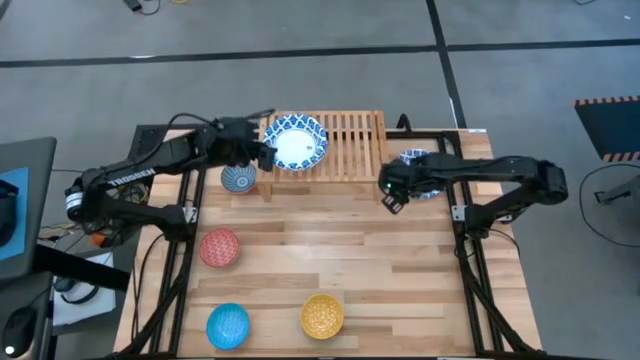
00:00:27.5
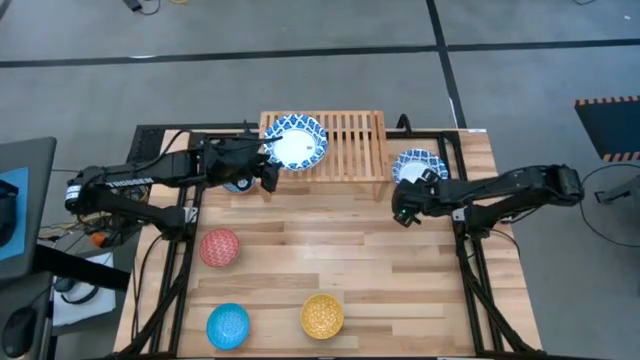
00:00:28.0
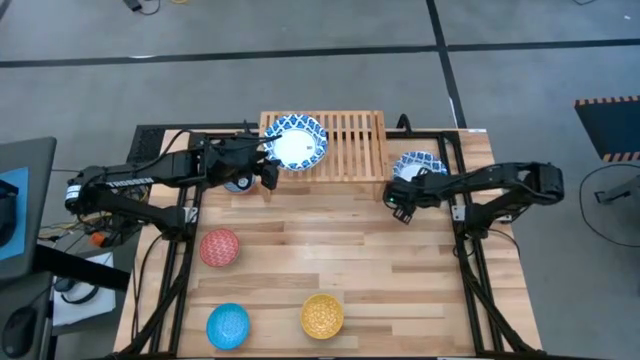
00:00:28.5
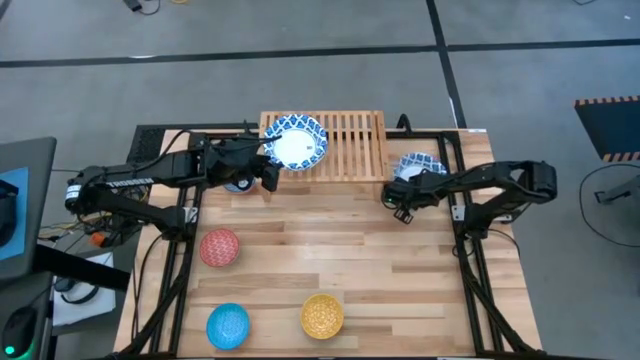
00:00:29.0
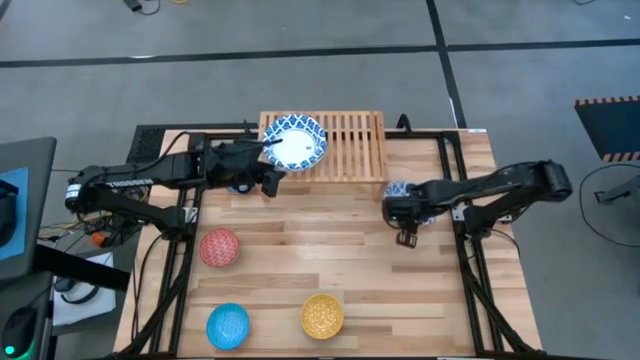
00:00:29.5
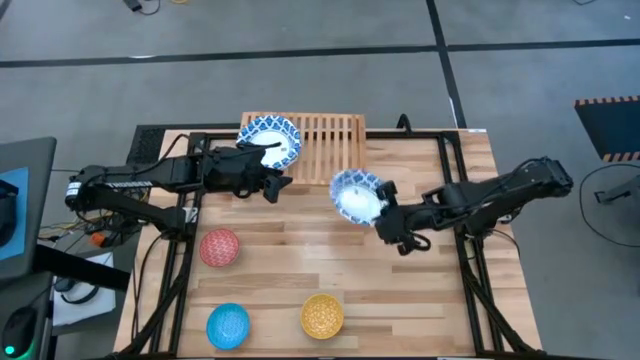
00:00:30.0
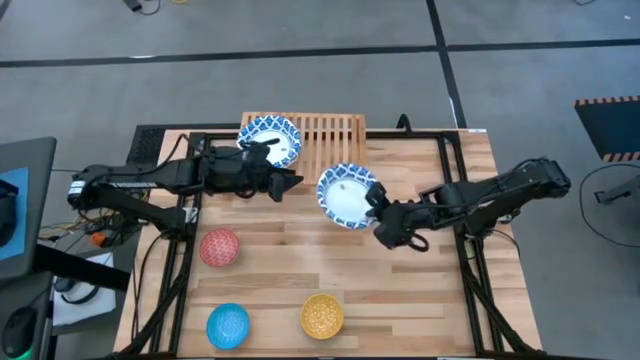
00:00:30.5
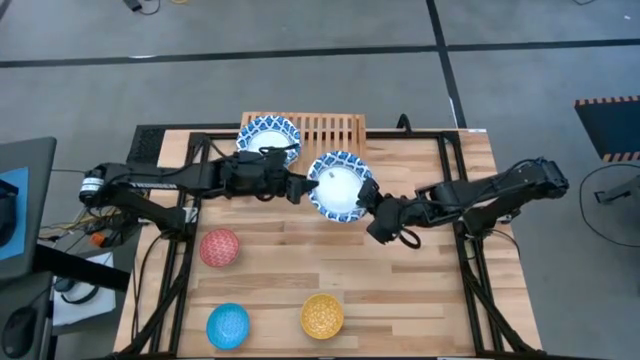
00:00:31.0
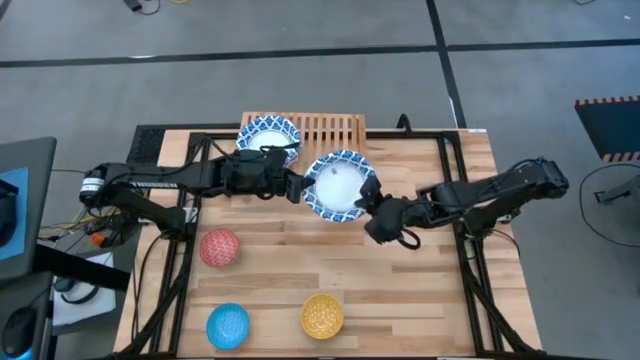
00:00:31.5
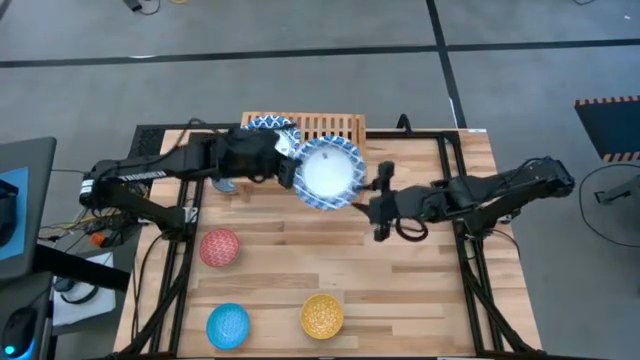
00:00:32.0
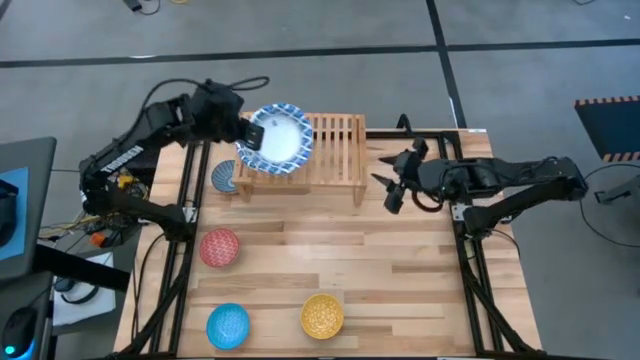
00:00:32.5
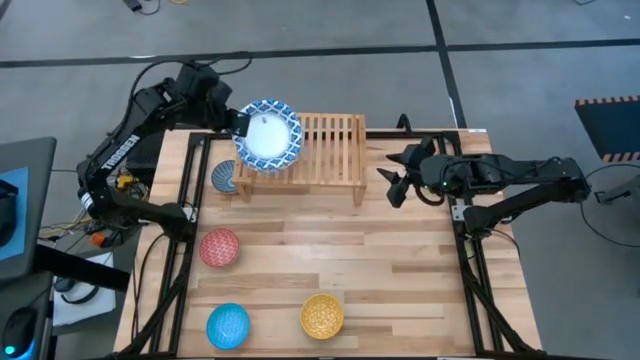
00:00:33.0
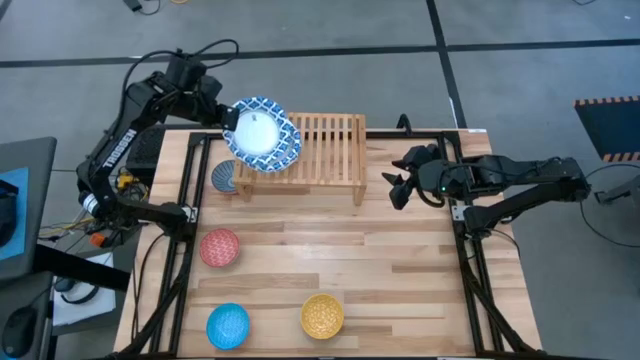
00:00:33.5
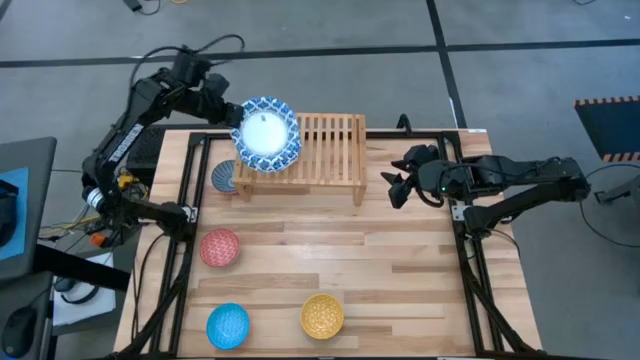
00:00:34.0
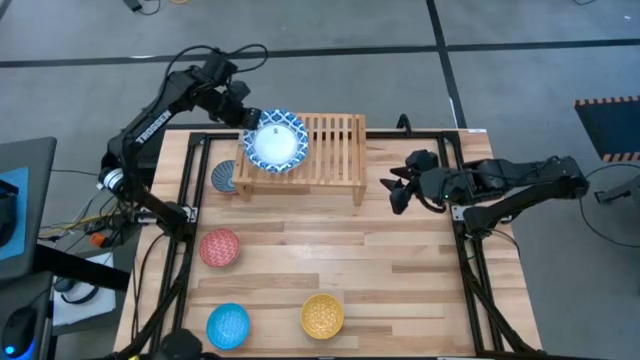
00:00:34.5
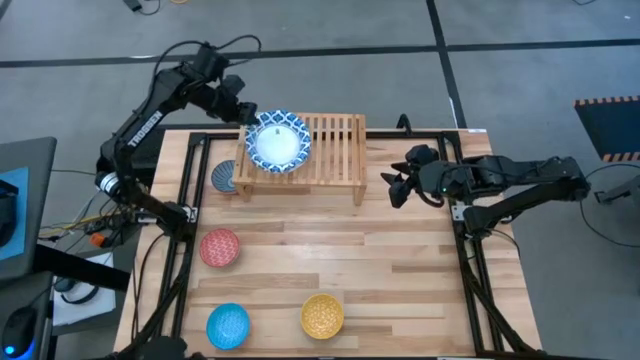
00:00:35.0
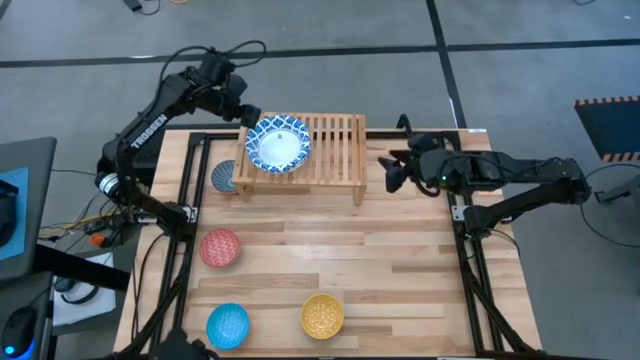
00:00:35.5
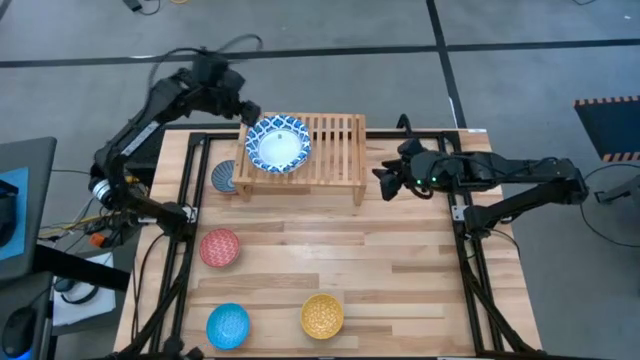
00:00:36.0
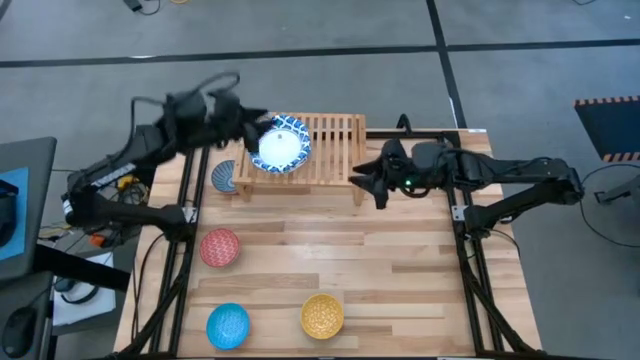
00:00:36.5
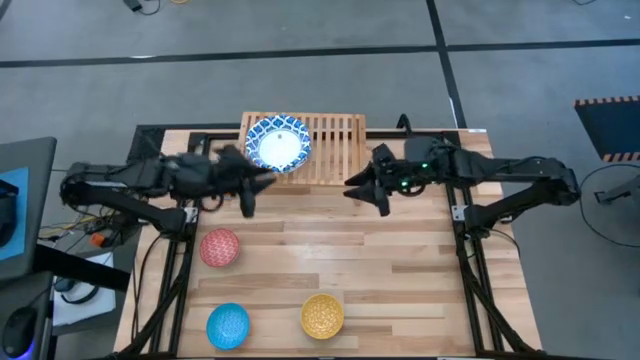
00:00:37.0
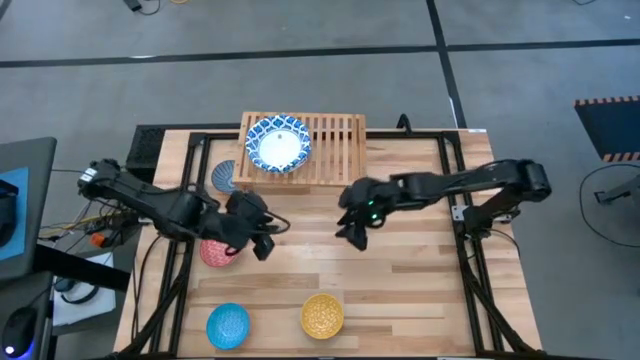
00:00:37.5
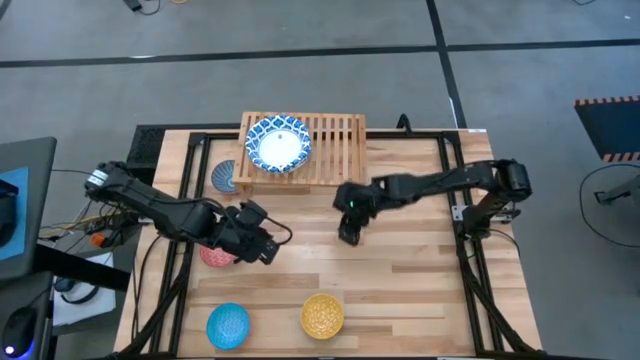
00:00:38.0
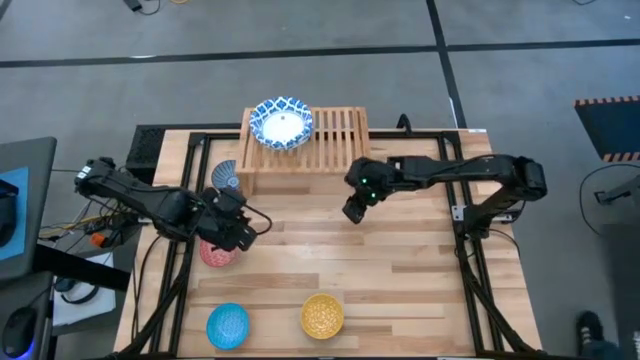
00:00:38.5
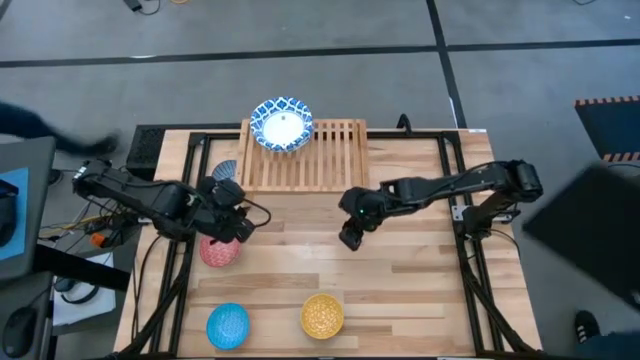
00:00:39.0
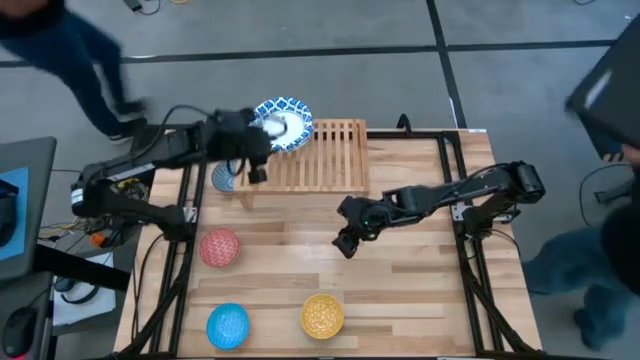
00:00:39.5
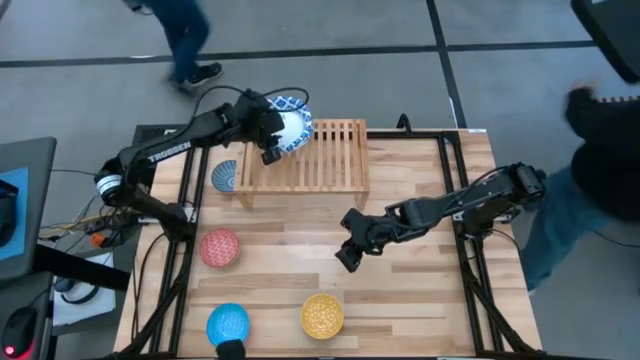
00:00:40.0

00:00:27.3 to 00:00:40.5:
Task: Place and stack bowls onto a shelf
Stack the white bowl on top of the stacked white bowls on the shelf

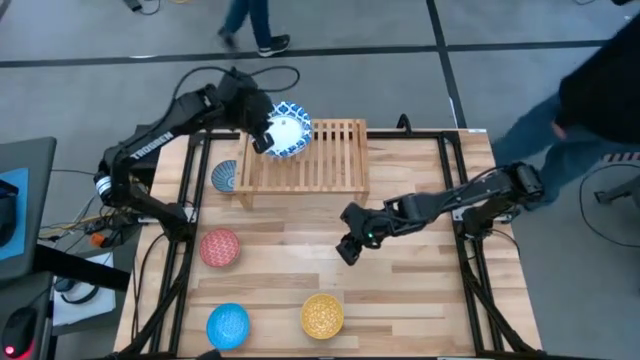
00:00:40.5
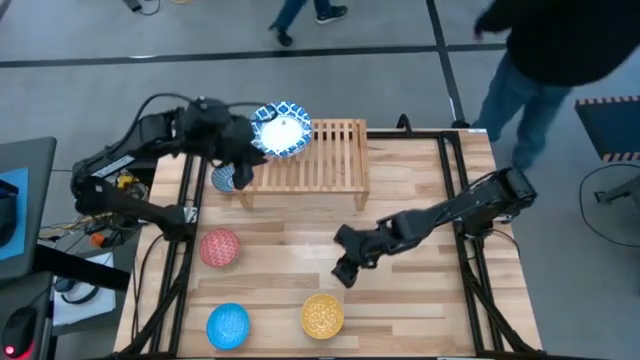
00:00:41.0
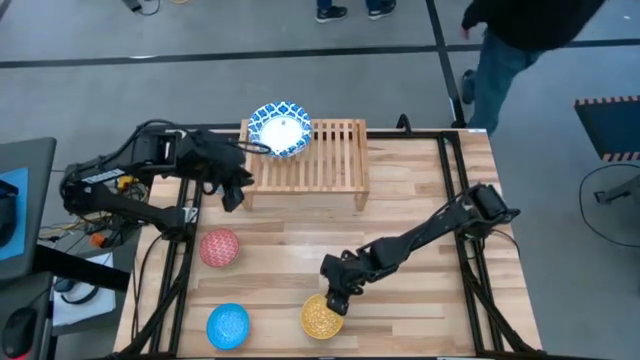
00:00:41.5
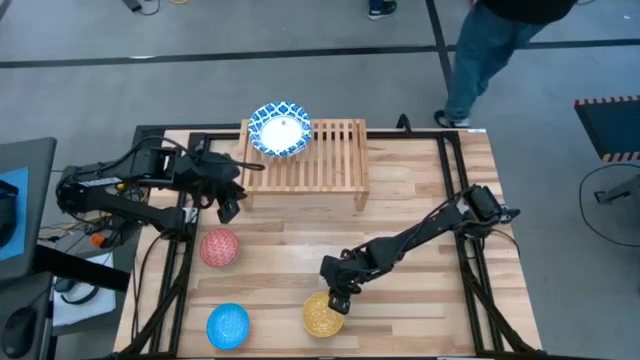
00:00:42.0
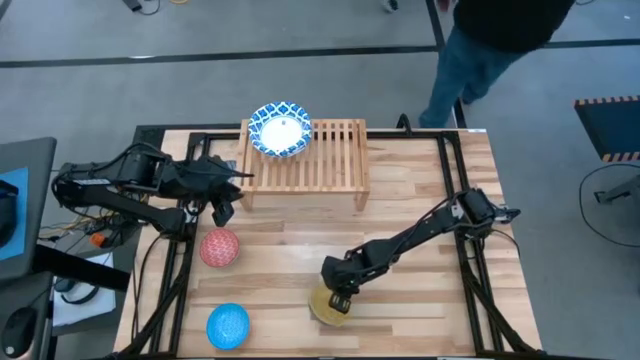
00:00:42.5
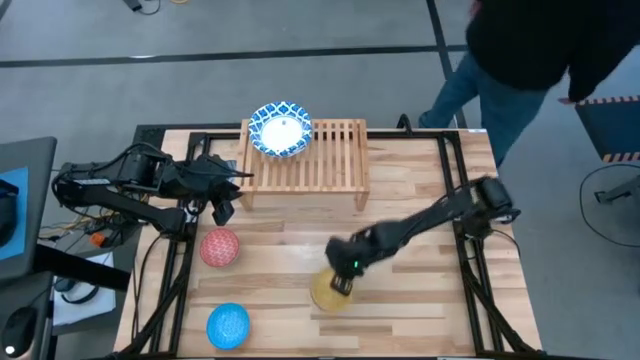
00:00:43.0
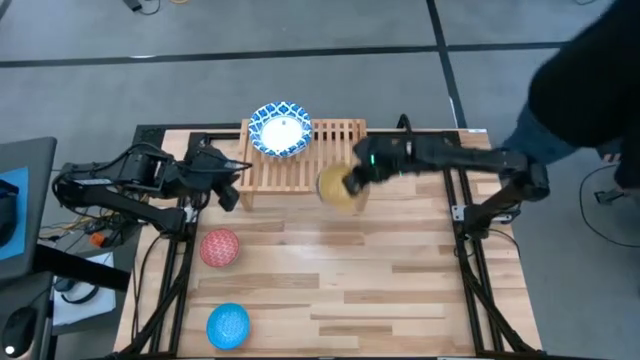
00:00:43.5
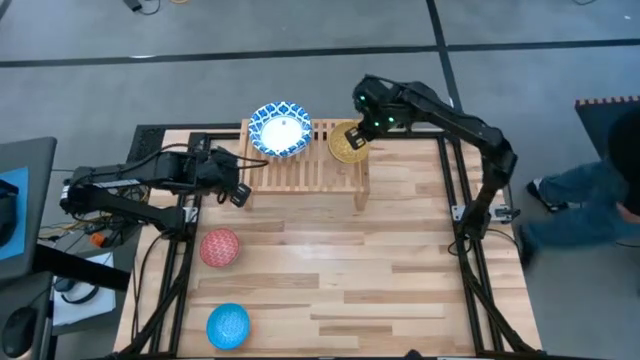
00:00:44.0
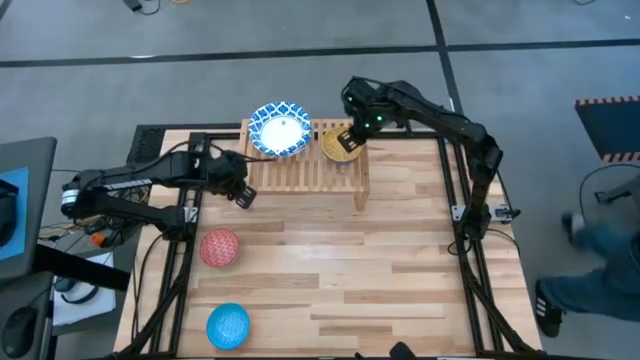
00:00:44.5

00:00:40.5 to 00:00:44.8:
Put the yellow bowl on the shelf

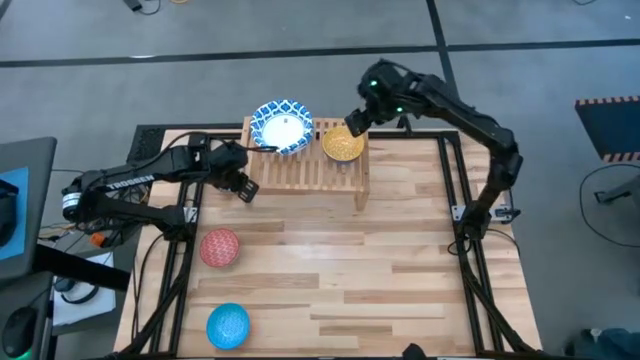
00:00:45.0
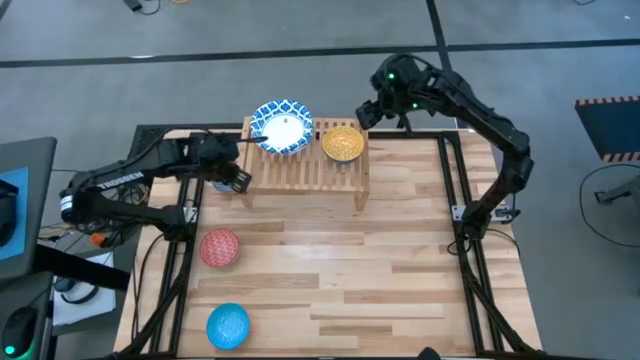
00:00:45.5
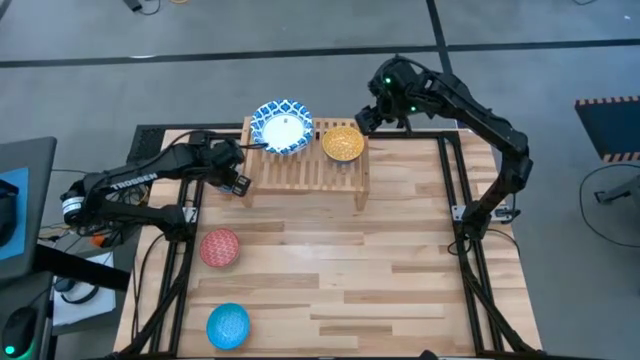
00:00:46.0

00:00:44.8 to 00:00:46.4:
Adjust the shelf
